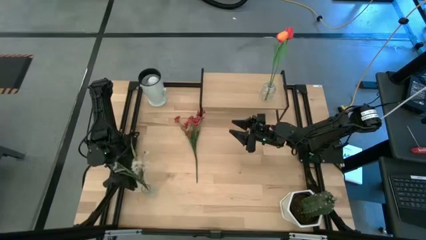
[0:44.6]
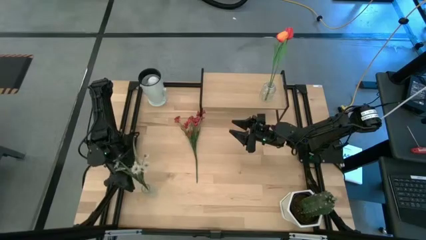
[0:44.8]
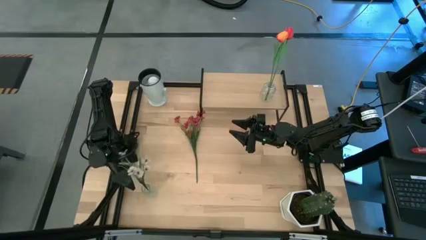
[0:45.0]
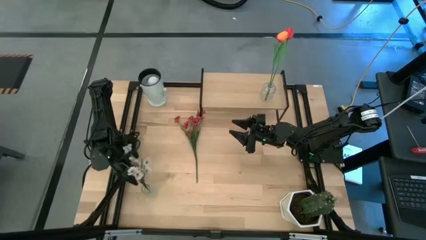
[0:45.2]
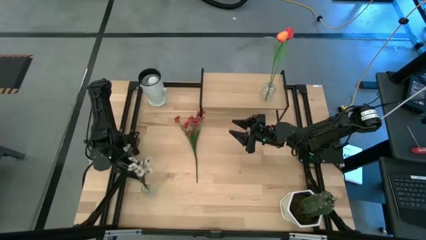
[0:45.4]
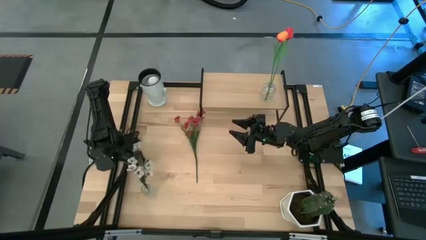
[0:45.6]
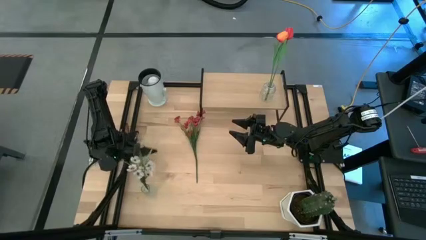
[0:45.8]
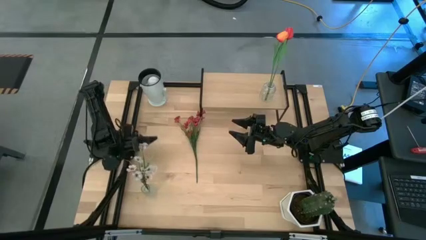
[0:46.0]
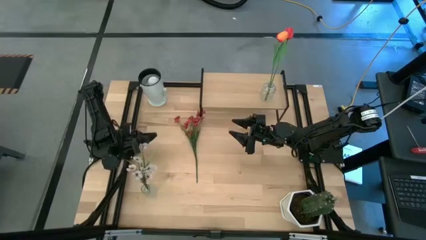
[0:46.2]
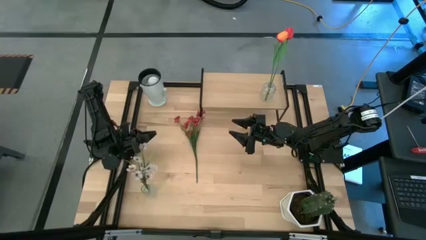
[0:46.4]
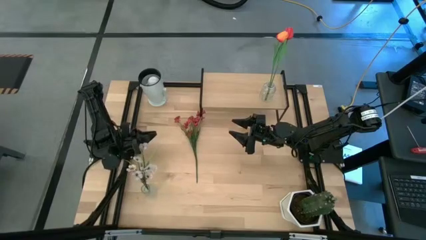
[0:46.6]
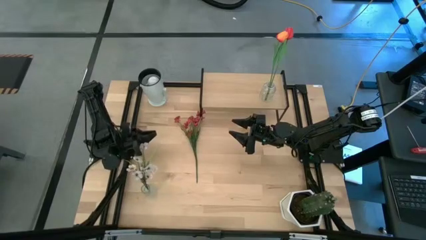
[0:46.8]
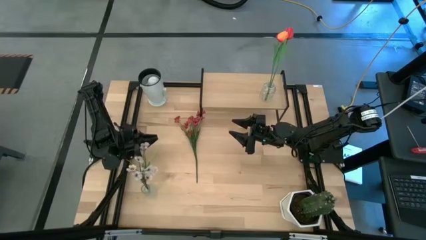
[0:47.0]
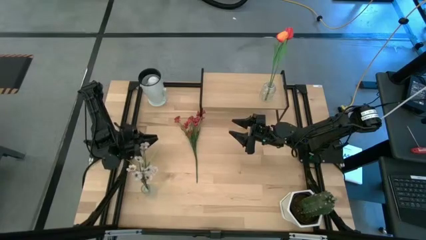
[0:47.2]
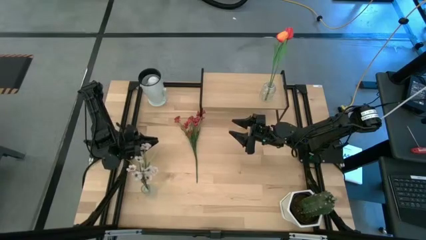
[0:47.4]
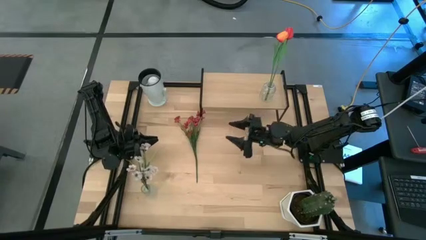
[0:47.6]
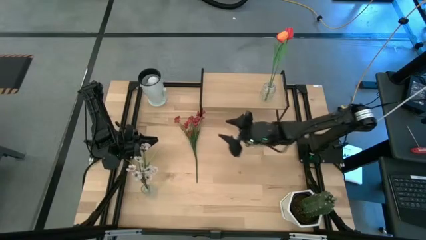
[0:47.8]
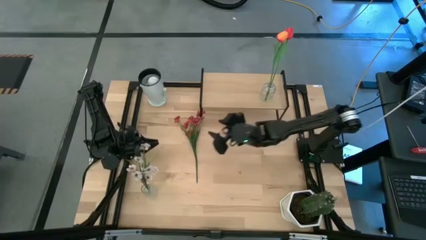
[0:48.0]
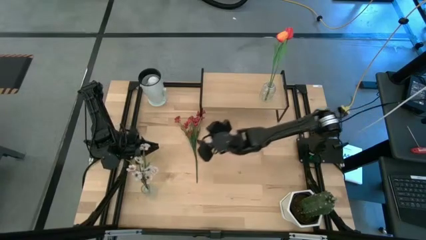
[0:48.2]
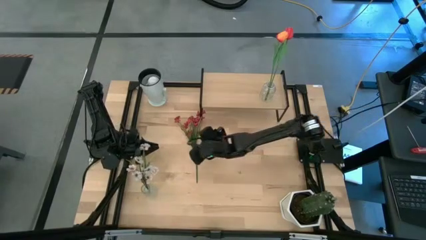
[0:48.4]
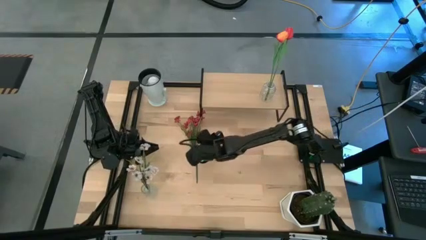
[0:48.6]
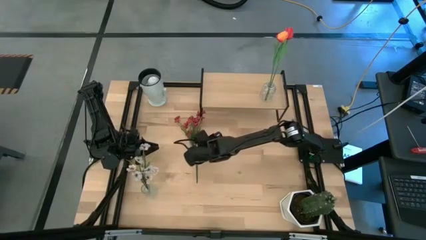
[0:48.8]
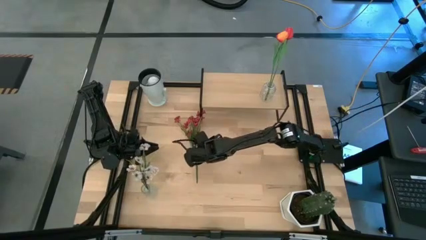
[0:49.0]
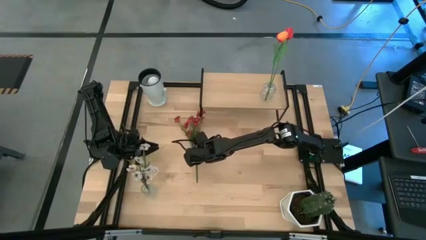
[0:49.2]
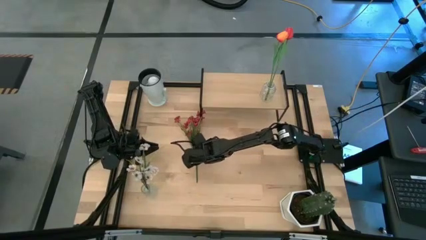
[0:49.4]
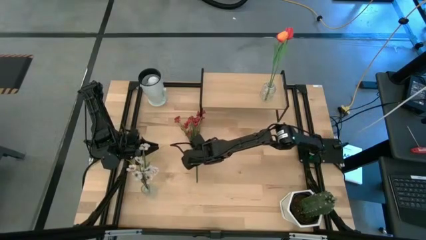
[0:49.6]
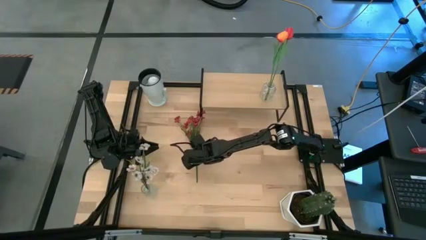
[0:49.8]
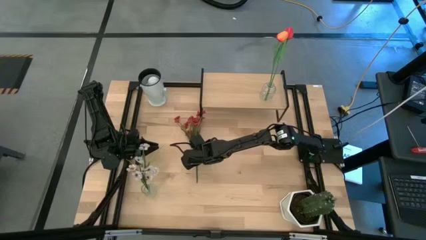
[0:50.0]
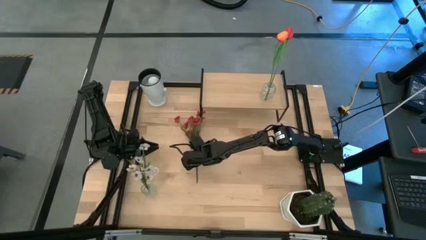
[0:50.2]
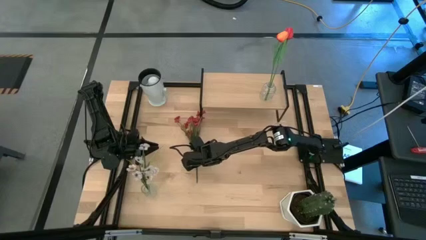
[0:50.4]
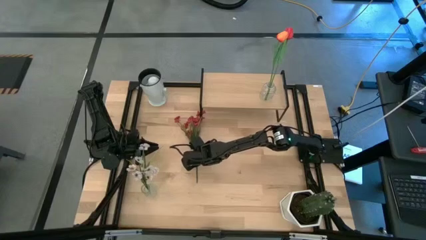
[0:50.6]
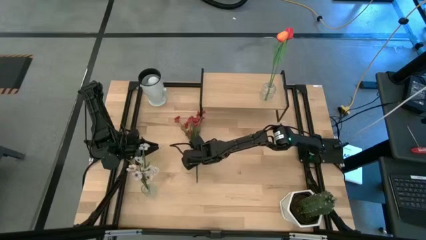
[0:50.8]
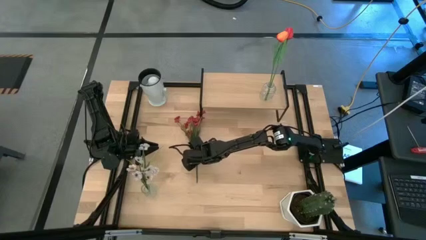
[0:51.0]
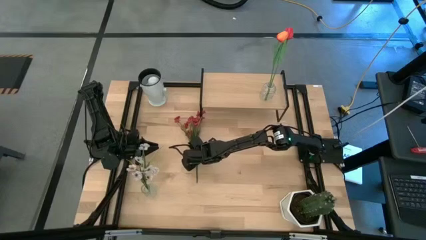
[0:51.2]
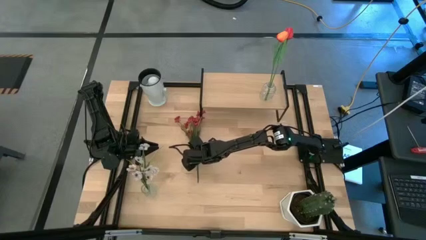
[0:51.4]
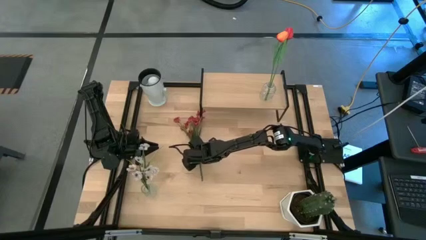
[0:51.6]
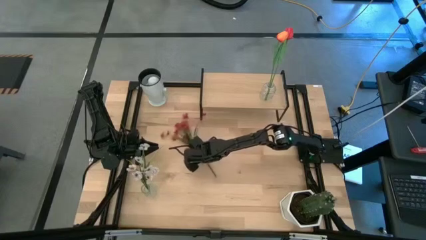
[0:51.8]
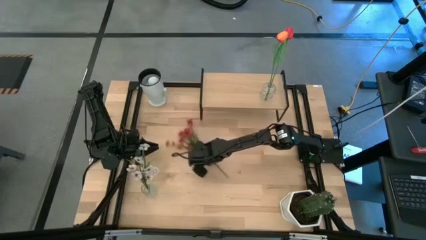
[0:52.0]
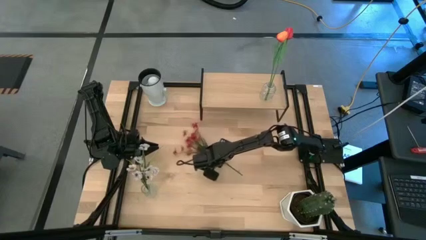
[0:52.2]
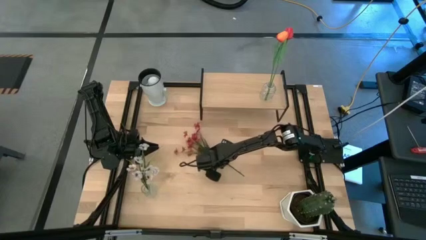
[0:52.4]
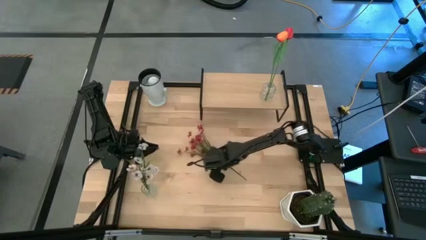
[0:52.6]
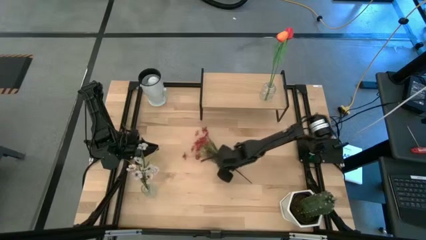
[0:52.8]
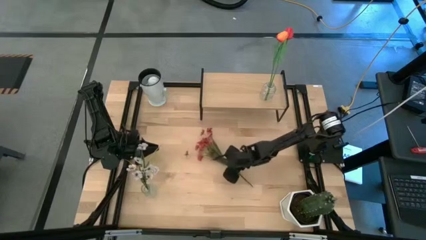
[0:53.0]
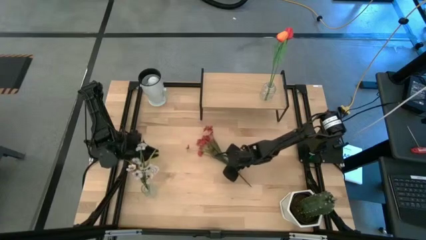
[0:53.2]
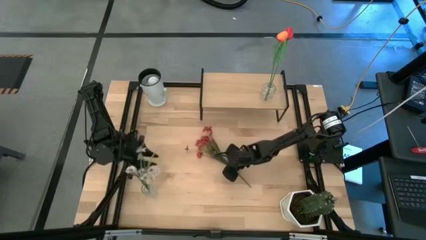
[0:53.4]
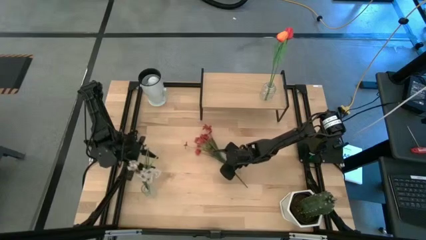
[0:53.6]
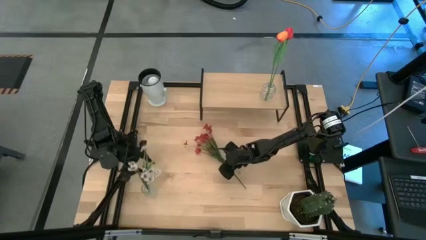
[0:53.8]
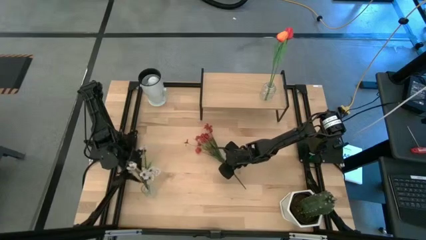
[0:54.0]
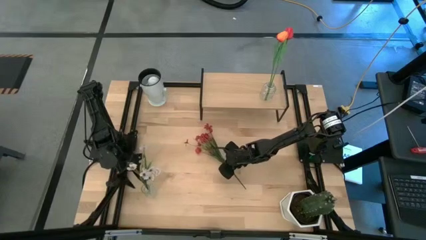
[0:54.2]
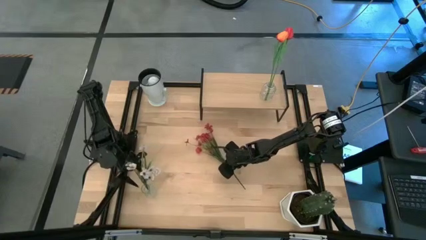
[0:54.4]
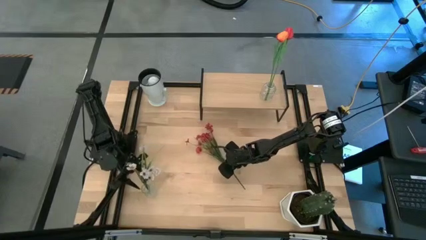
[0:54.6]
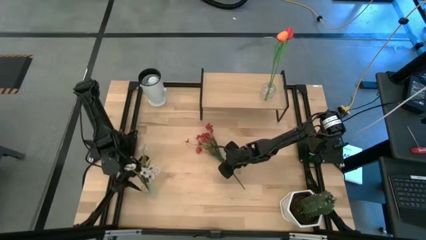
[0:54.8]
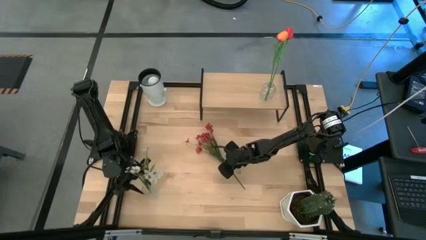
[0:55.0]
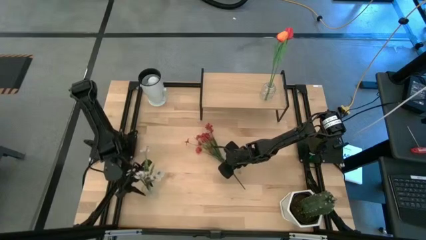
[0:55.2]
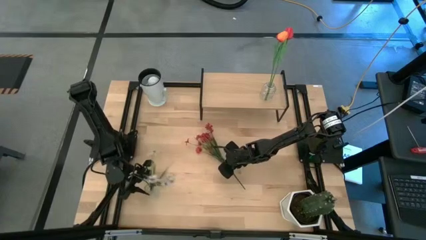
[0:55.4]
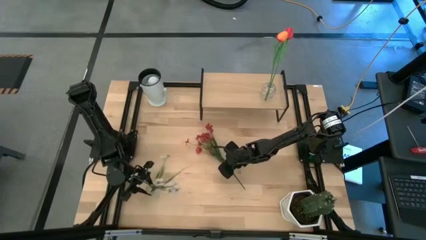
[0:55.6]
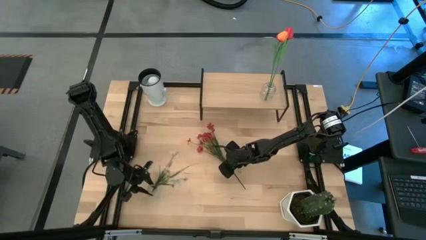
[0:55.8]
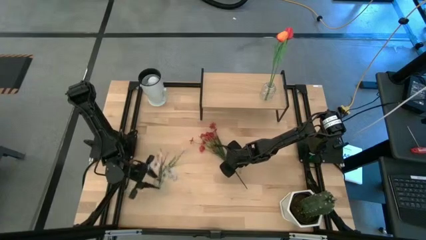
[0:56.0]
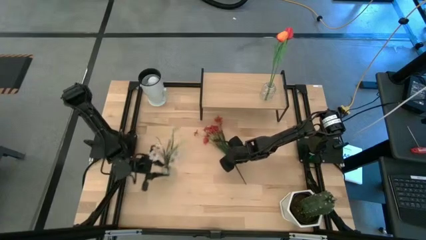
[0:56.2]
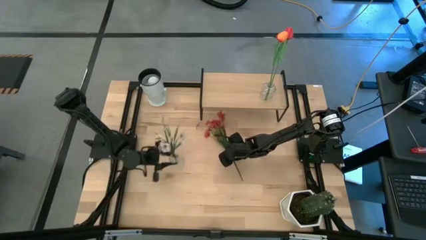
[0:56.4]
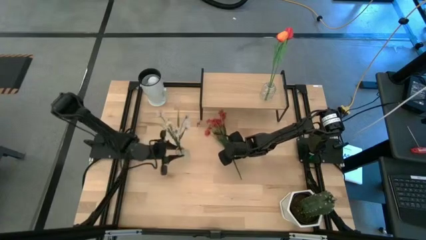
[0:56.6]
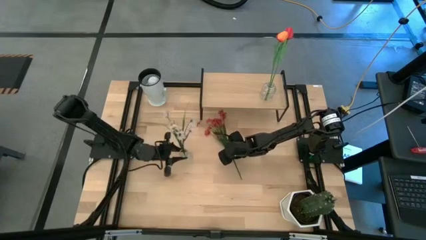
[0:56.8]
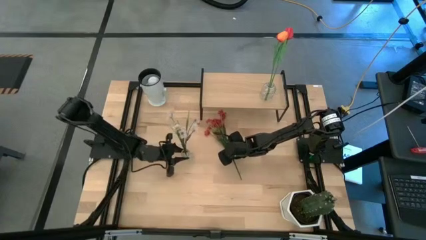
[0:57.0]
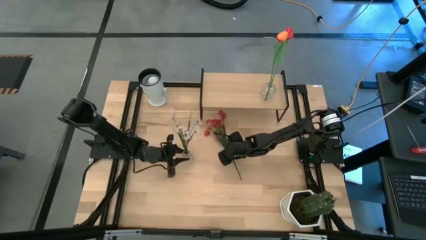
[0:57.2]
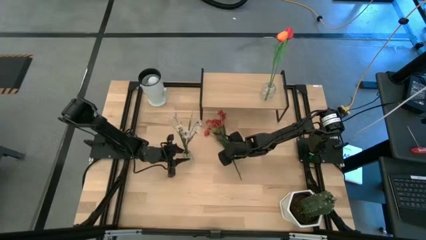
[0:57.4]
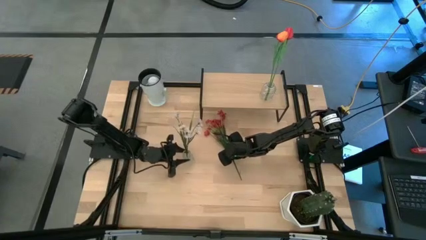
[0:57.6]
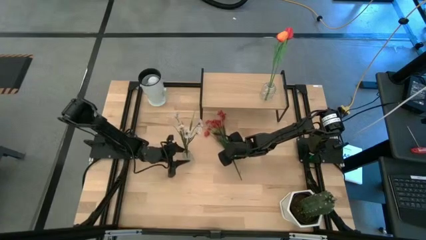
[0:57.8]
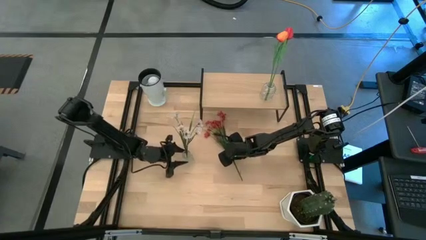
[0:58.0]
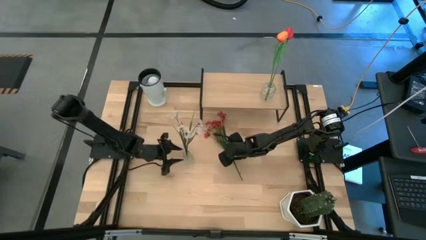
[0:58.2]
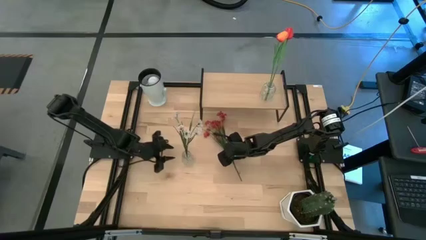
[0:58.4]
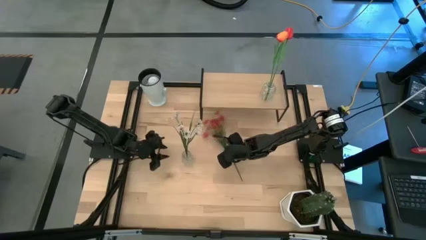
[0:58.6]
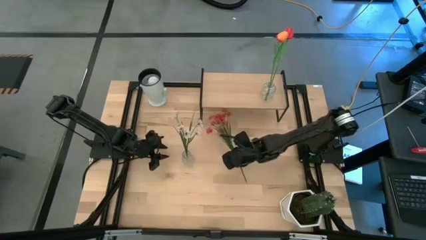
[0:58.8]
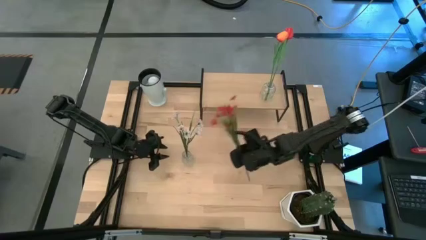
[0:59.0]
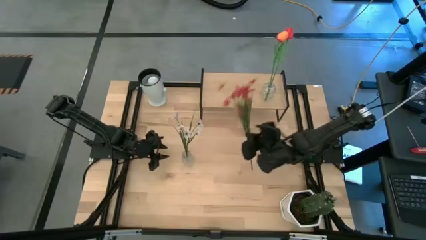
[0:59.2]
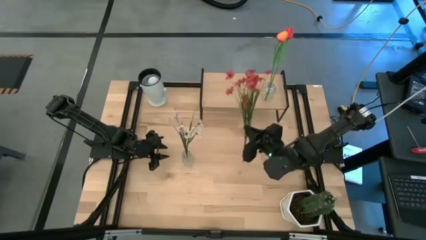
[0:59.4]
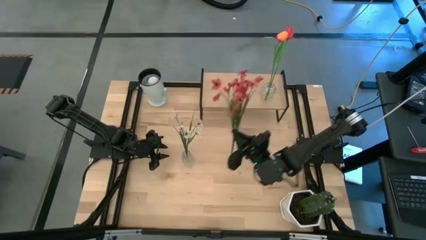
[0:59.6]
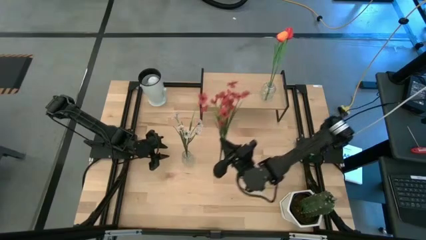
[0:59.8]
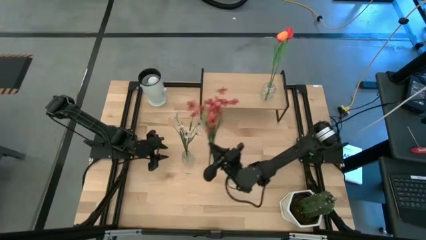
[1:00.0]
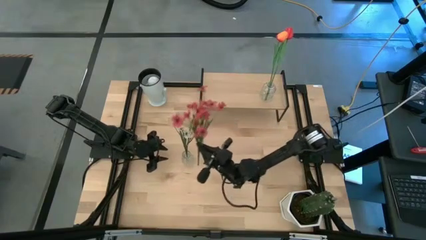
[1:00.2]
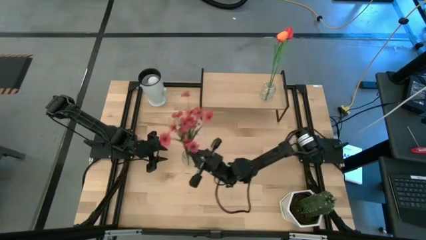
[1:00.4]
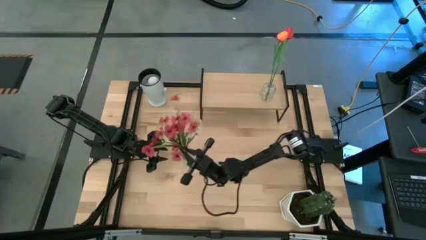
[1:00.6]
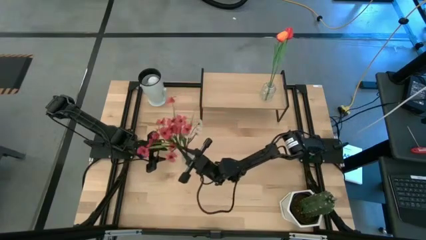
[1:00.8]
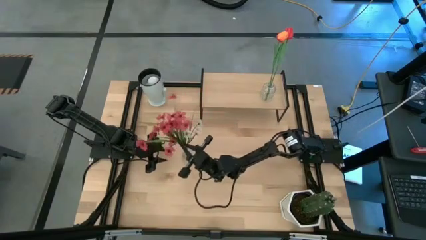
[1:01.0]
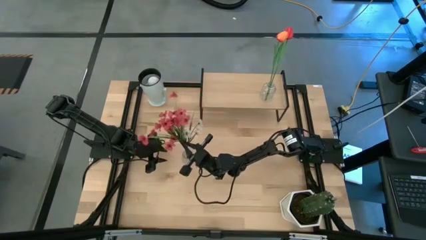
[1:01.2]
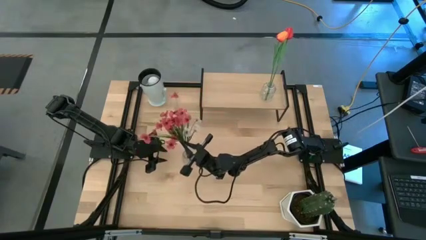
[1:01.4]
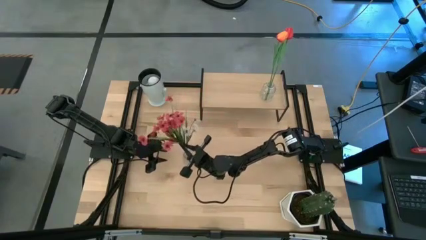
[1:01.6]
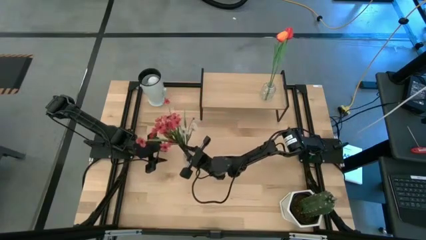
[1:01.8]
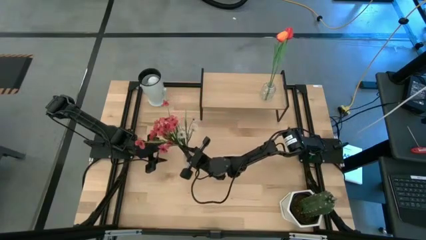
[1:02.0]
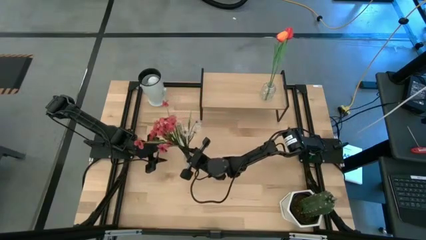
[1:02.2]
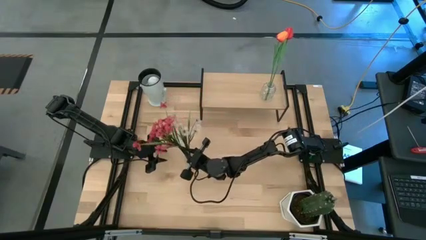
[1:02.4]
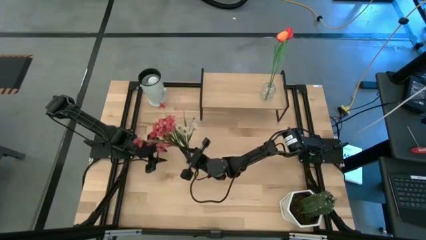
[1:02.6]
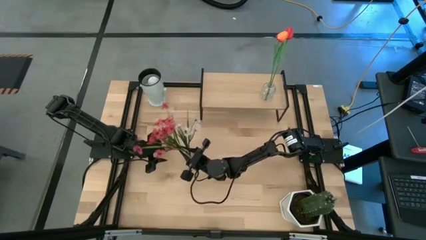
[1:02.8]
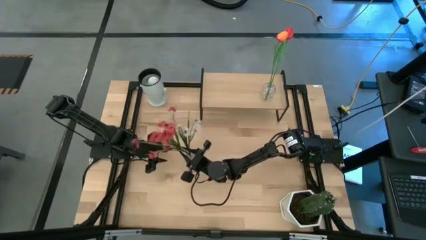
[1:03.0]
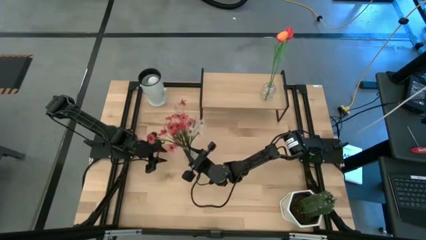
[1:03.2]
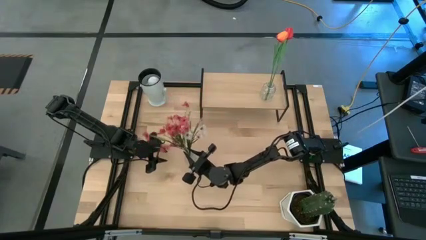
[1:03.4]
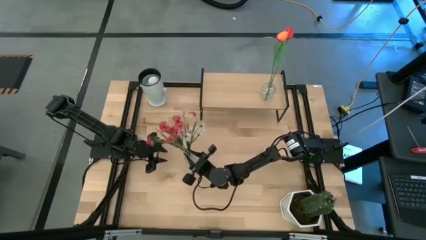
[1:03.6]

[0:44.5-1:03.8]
Task: Pick and place flowers into a vace then onto a shelf
Put the red flowers into the transparent vase
